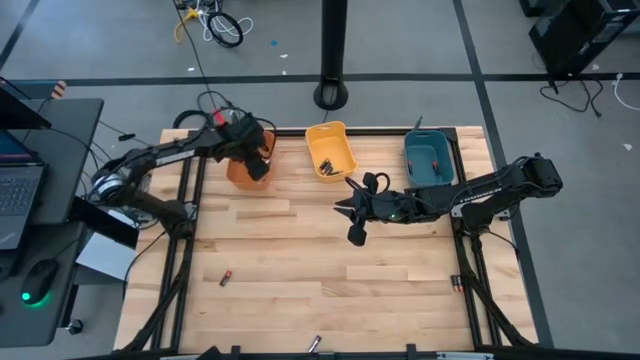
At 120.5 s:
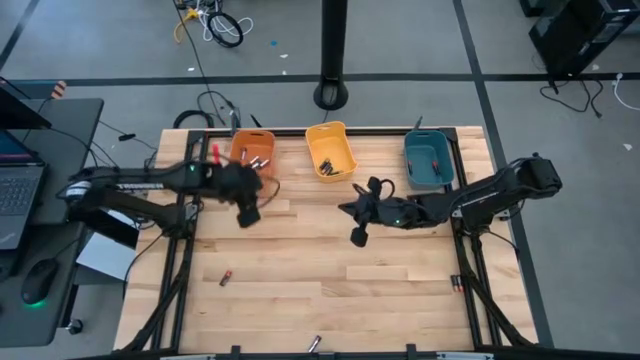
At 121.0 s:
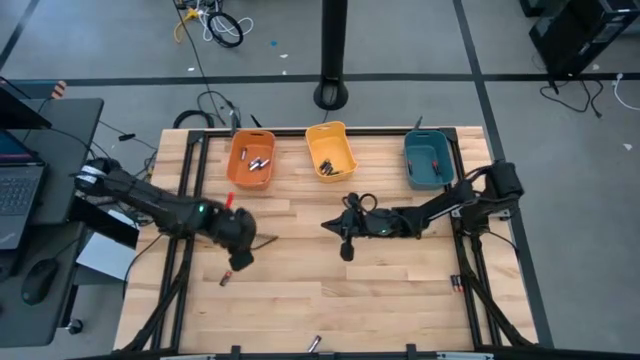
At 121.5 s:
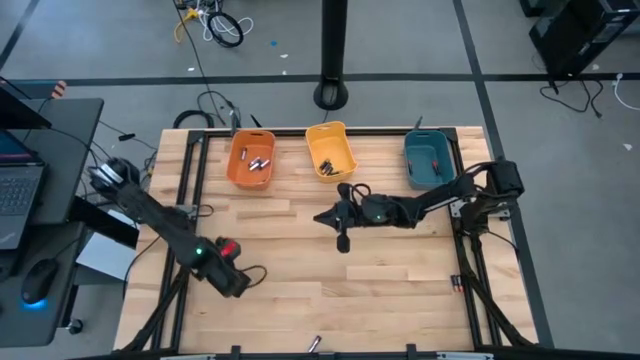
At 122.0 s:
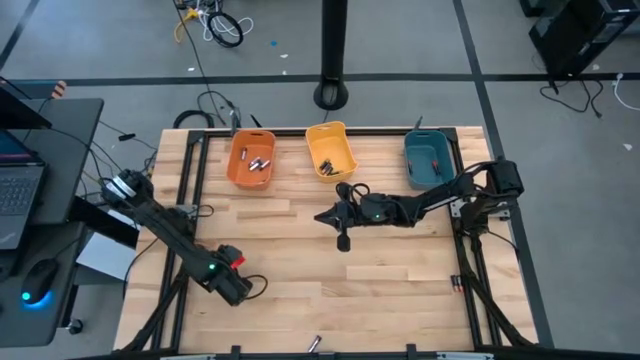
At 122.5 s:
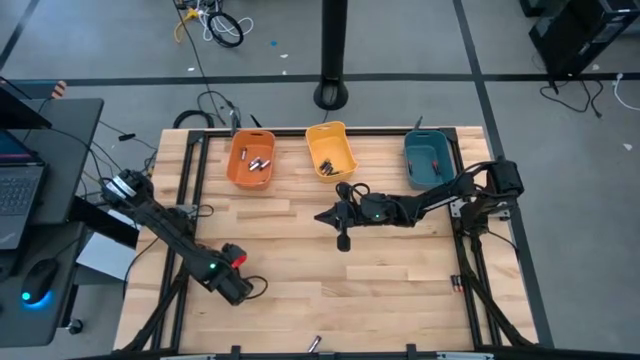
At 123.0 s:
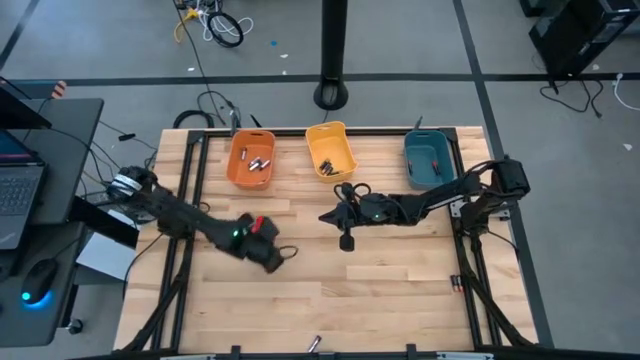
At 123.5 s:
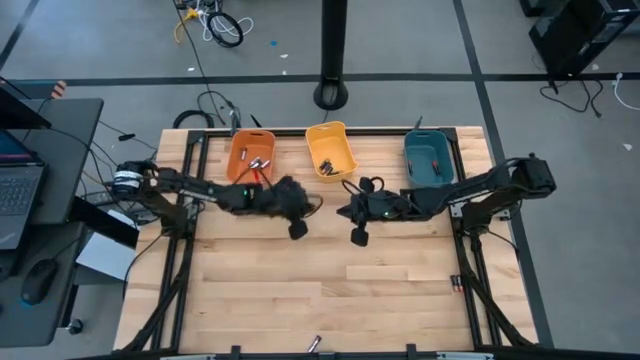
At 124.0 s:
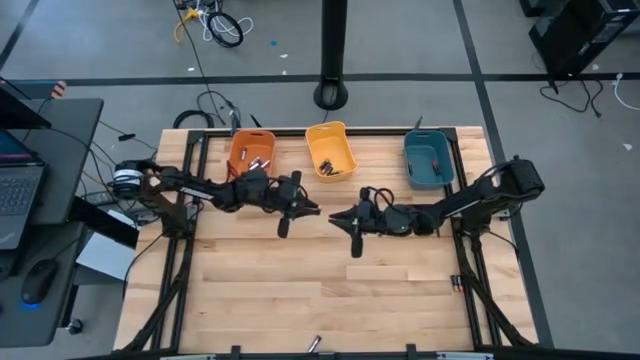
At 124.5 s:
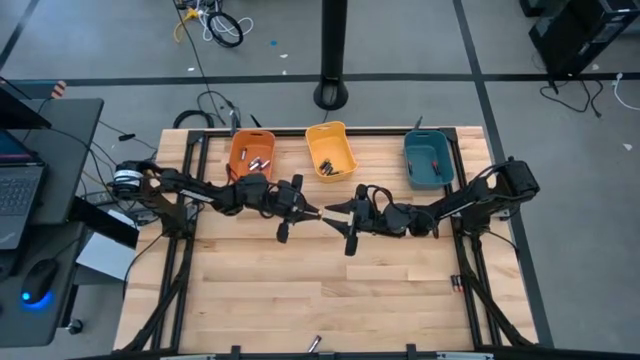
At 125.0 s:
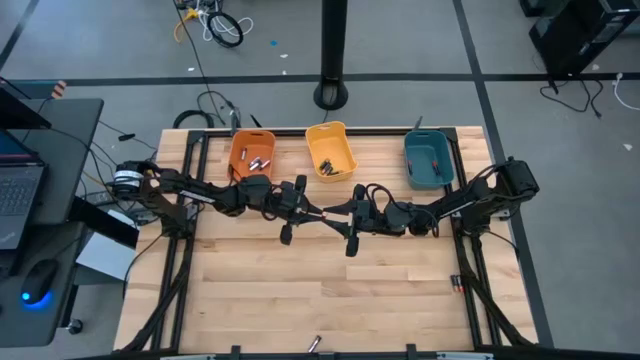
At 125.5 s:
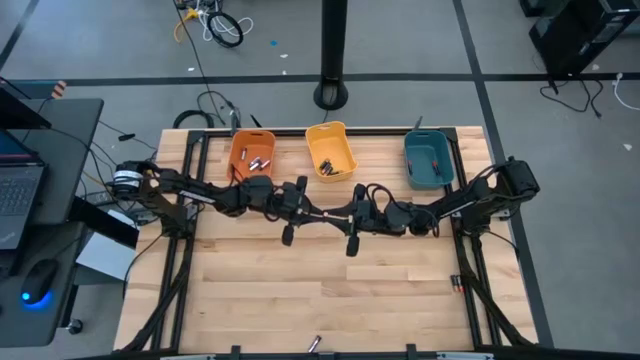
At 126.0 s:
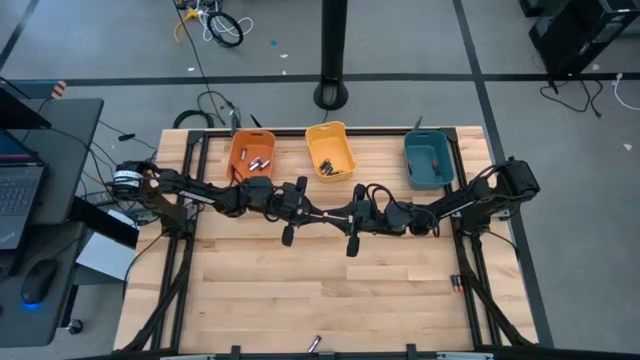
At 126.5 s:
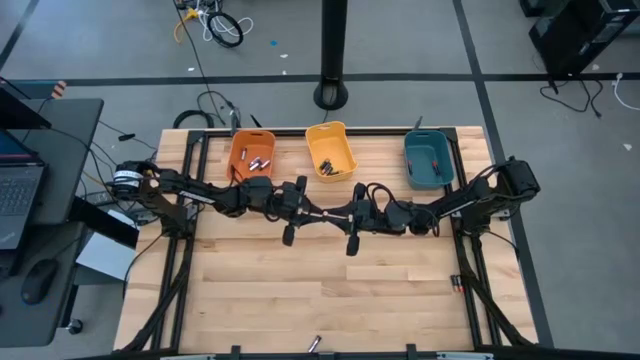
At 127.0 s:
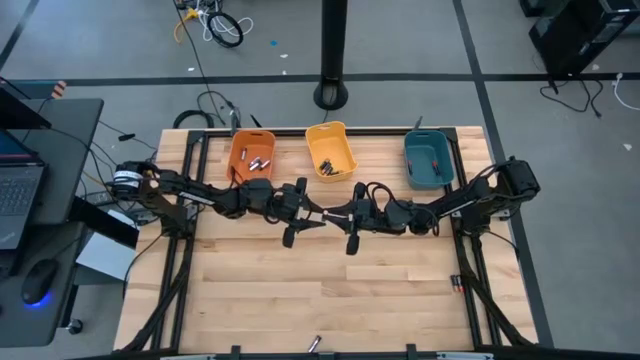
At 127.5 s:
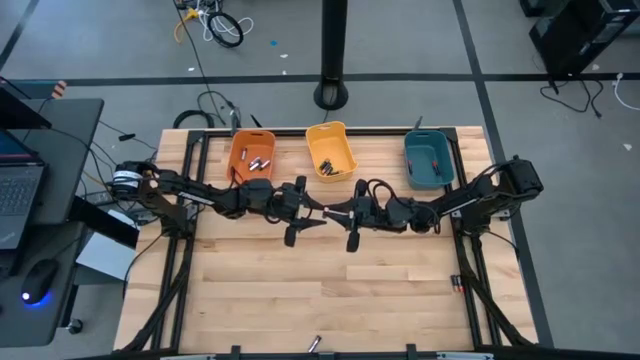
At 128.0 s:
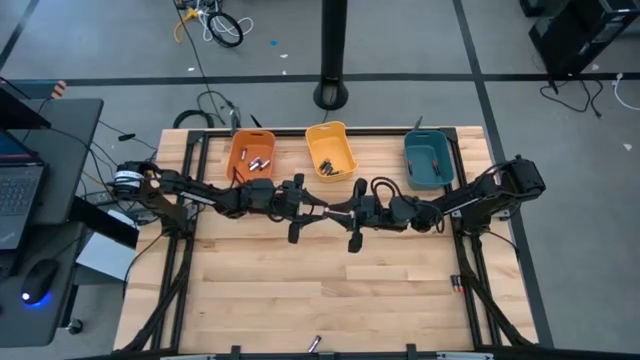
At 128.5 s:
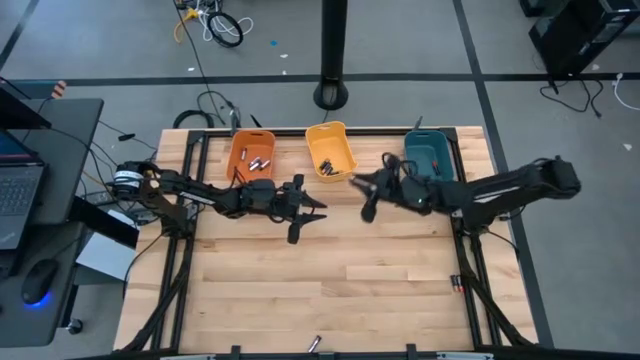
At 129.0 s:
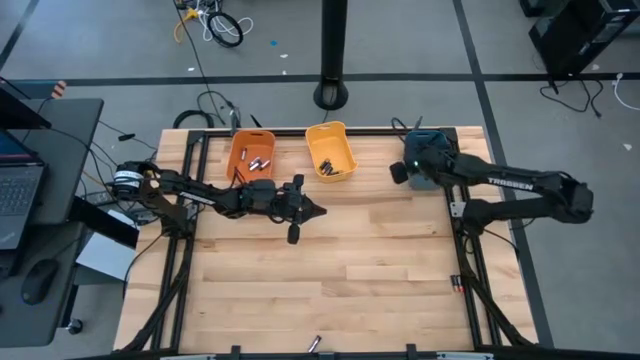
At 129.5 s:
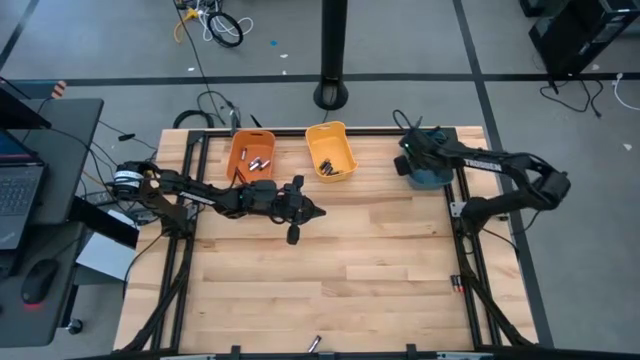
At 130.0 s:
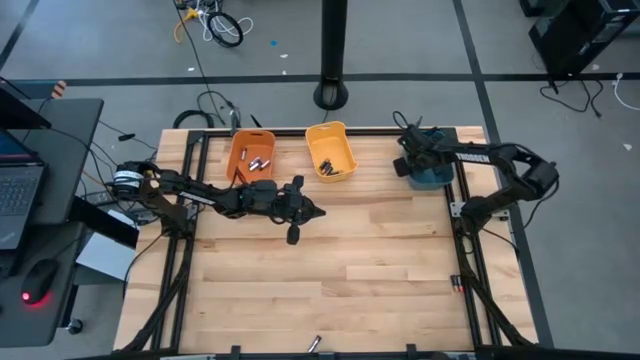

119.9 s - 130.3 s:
Task: Sort batteries
Put the orange battery into the blue bin

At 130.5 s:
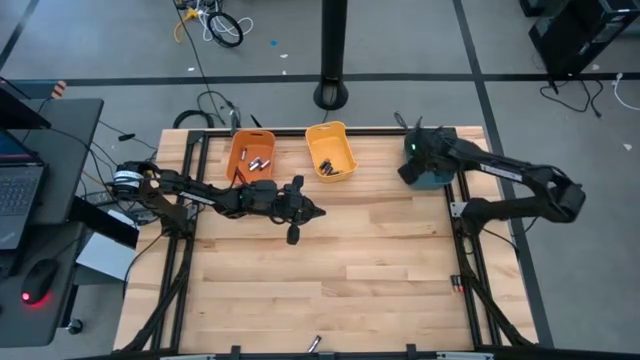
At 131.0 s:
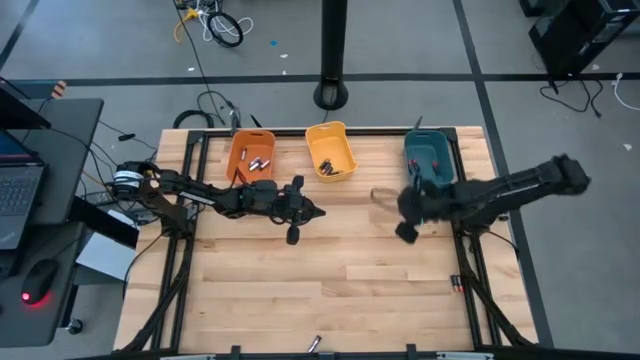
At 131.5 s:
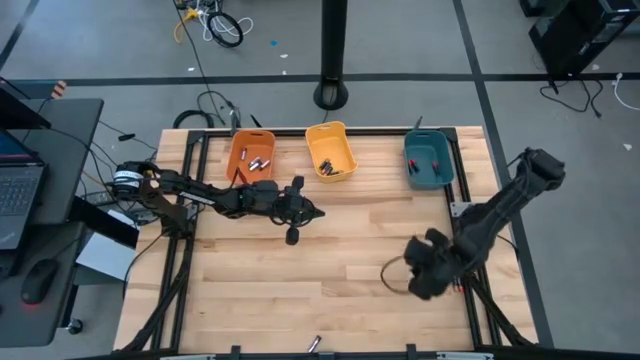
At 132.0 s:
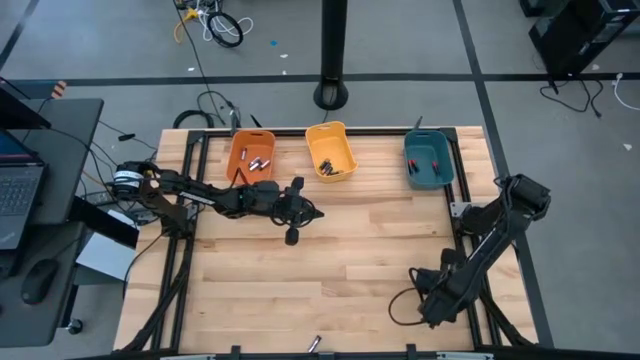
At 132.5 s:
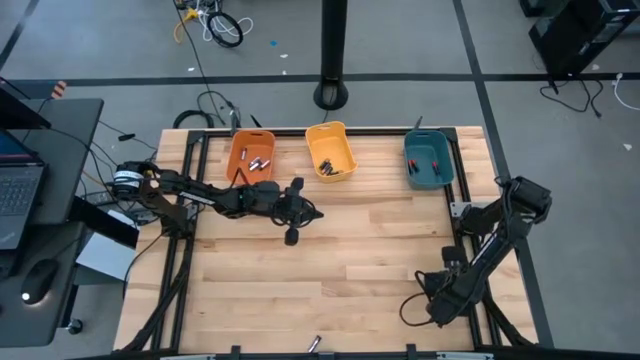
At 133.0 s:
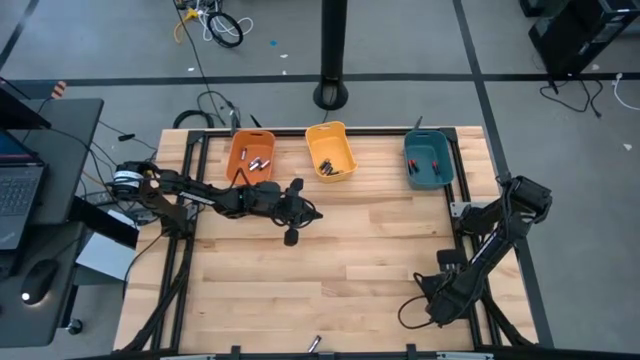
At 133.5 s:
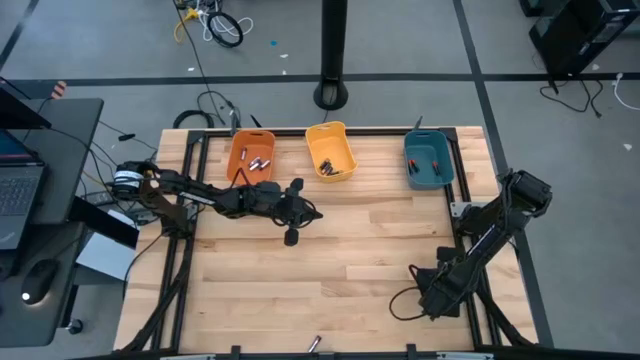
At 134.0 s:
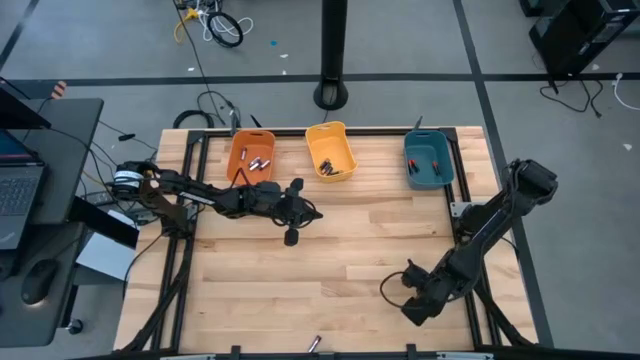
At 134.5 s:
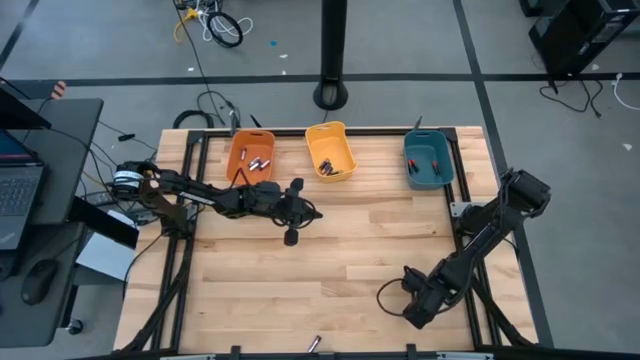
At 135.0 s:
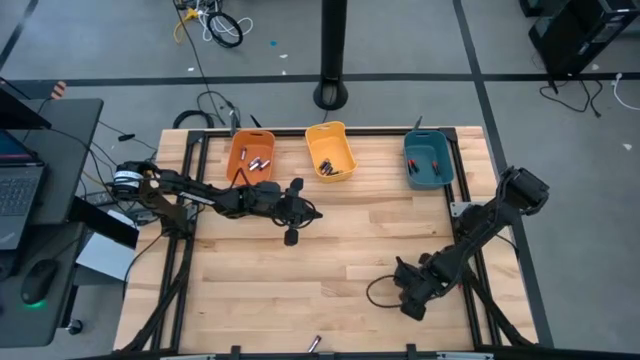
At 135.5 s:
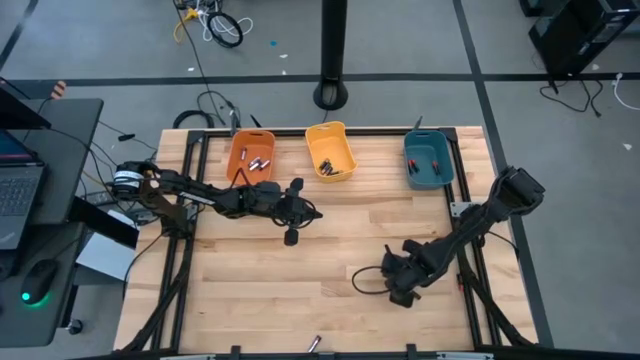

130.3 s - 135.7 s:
Put the black battery into the yellow bin

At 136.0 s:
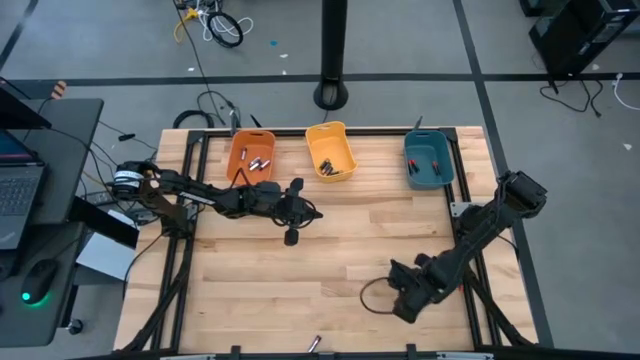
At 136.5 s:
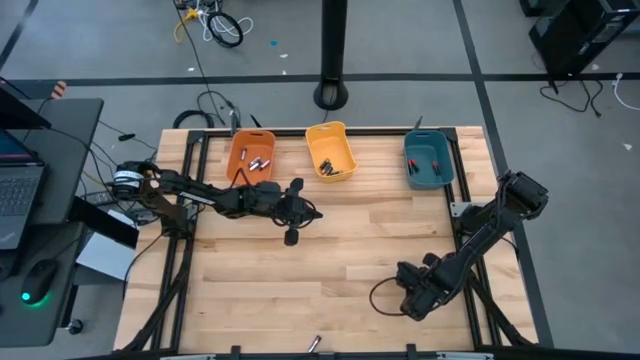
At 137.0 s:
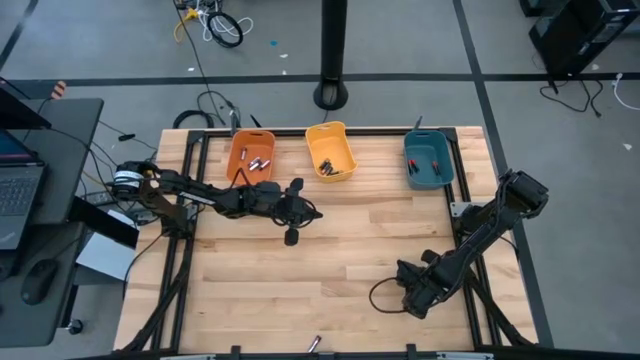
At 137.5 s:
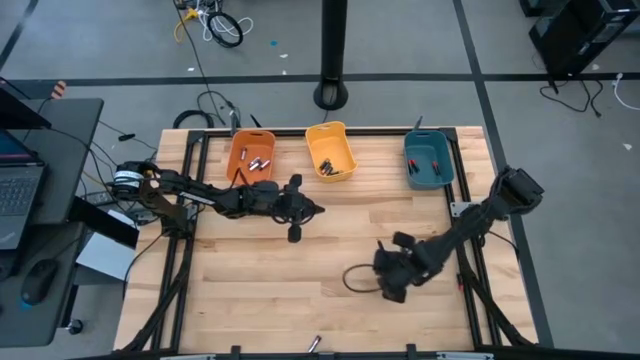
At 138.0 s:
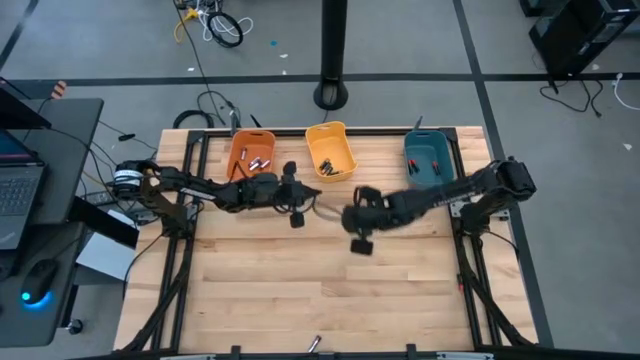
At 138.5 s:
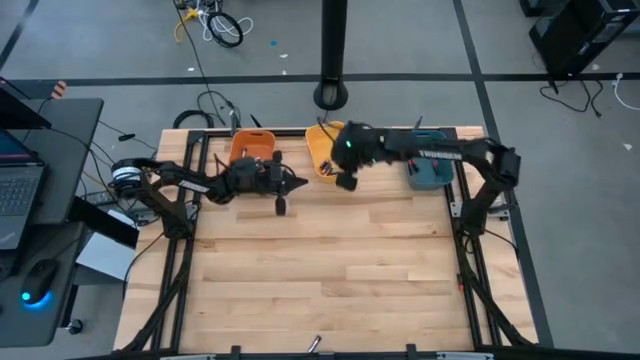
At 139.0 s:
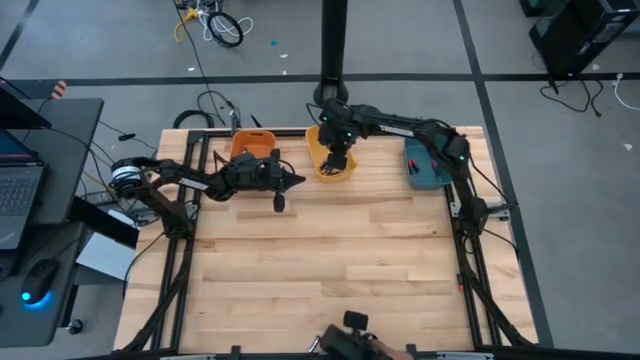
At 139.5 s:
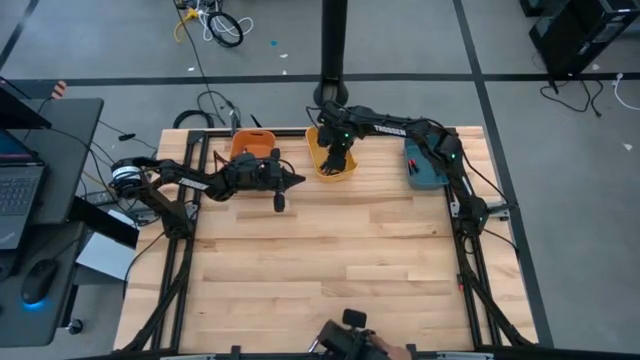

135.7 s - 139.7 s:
Put the black battery into the yellow bin

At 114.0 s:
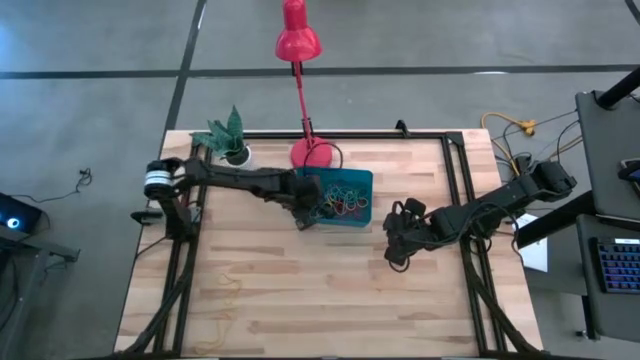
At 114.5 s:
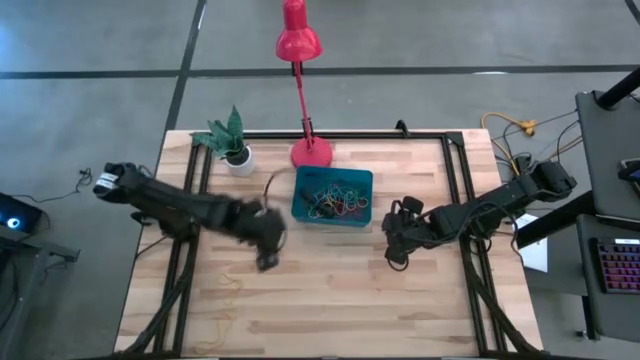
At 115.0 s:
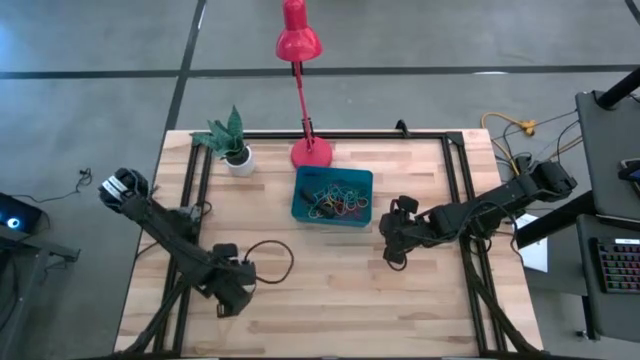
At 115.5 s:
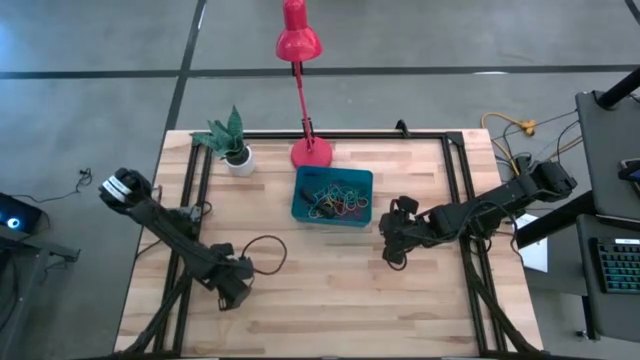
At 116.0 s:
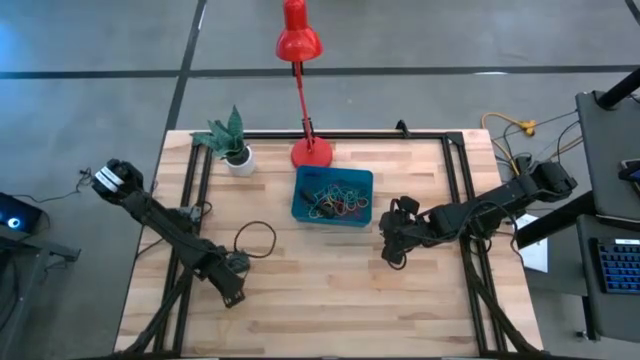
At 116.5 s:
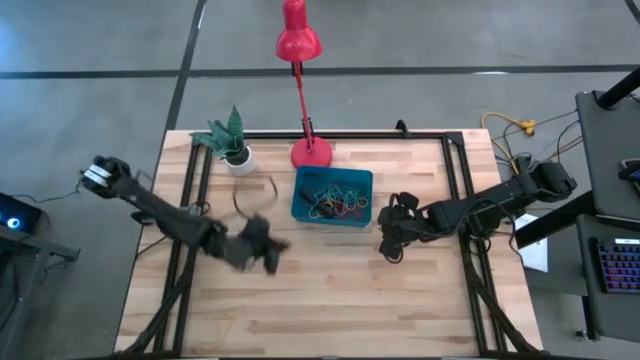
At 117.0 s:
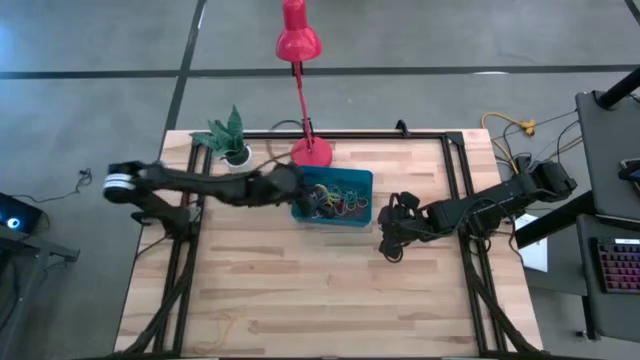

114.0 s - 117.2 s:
Task: Pick and place rubber bands into bin
Put the yellow rubber band into the blue bin
